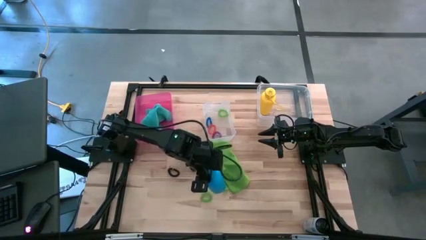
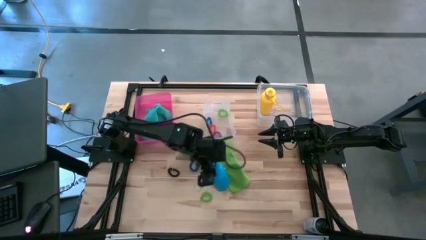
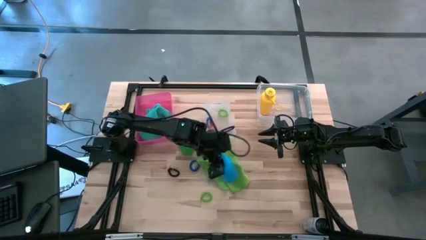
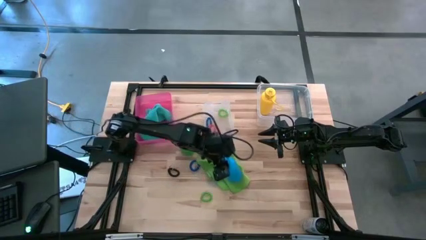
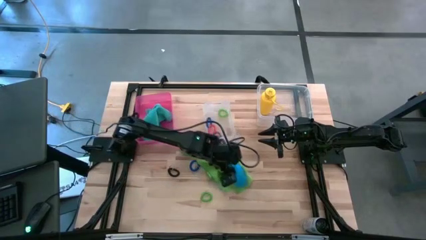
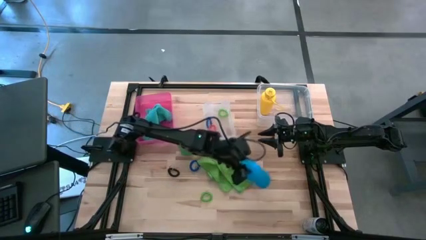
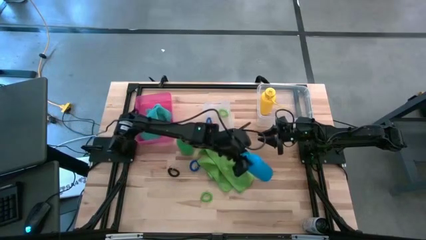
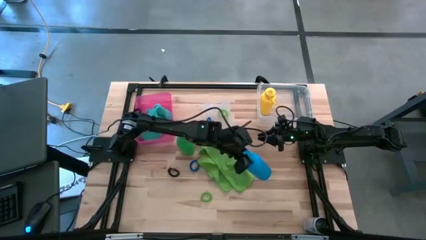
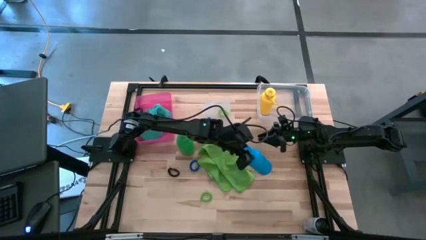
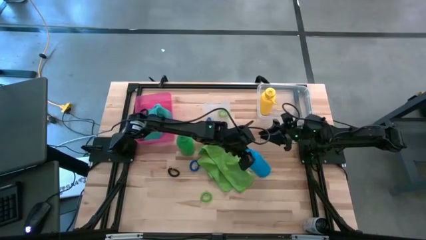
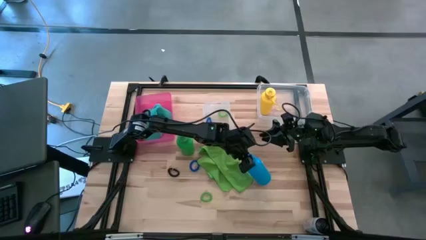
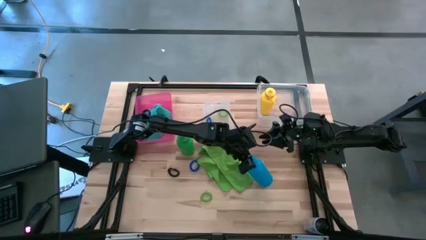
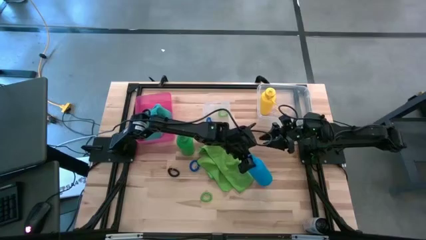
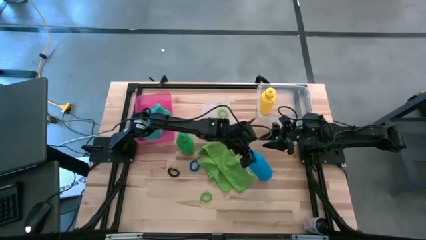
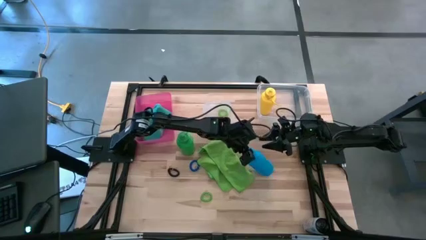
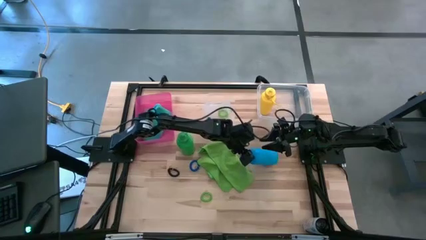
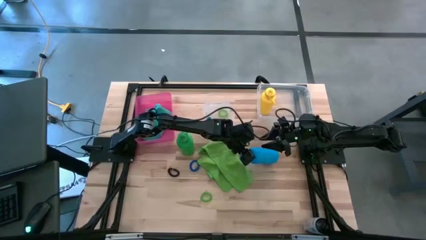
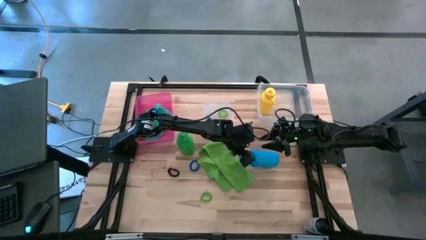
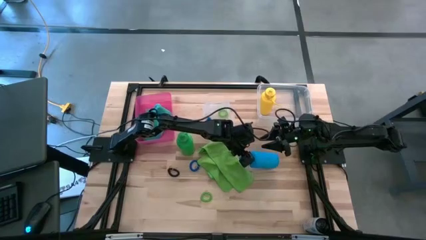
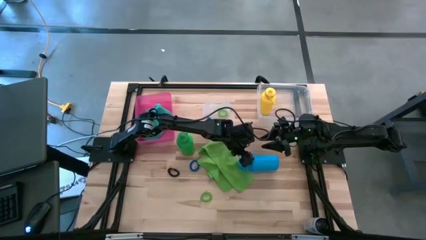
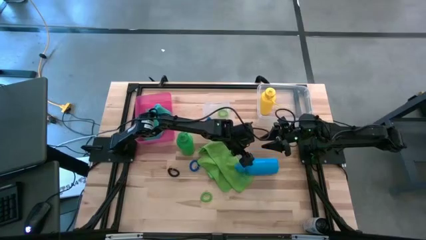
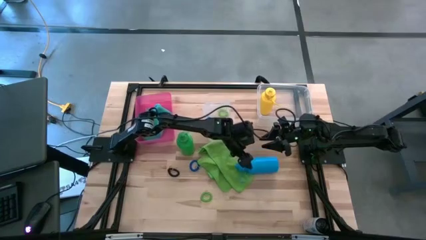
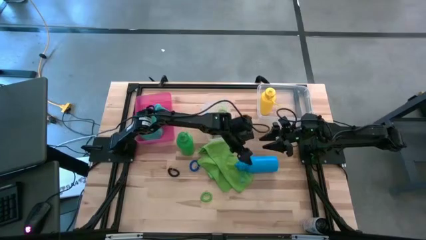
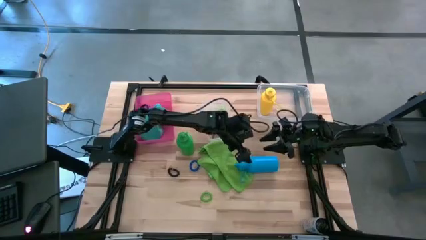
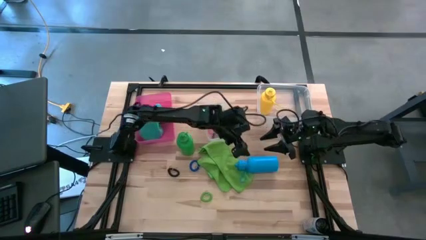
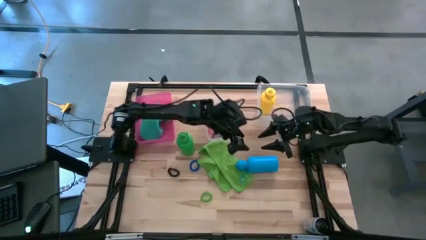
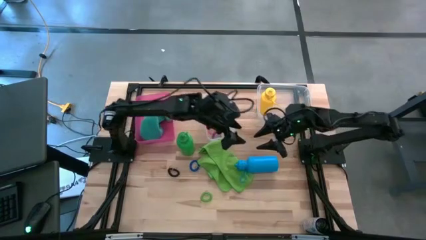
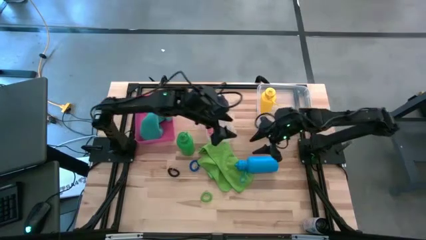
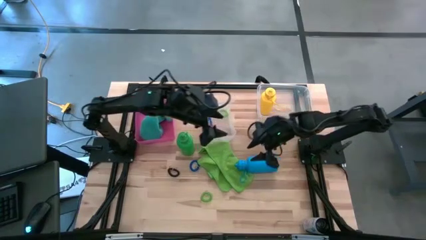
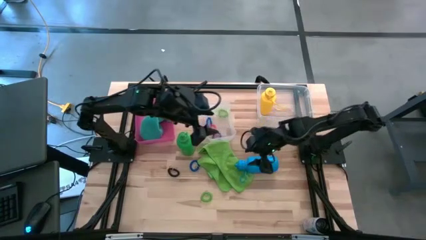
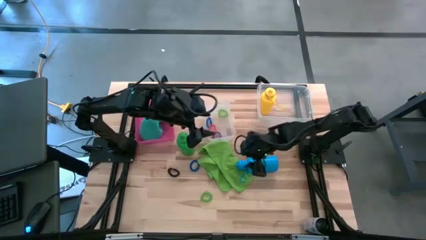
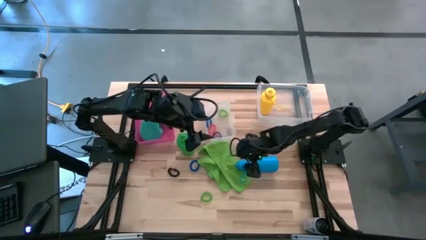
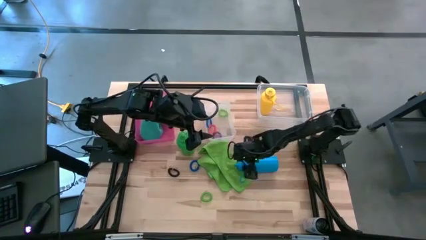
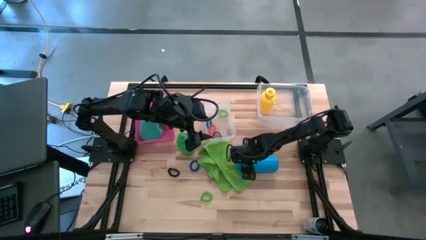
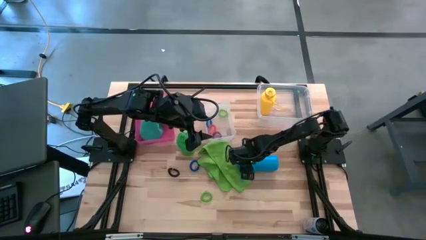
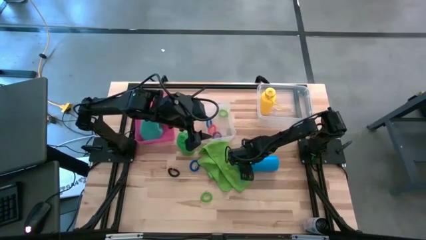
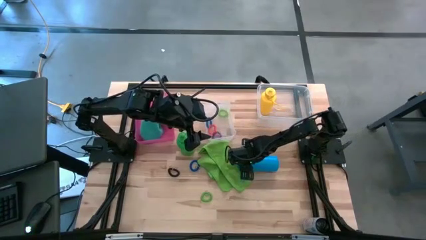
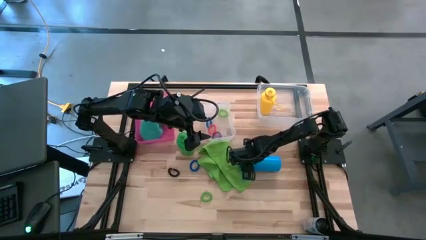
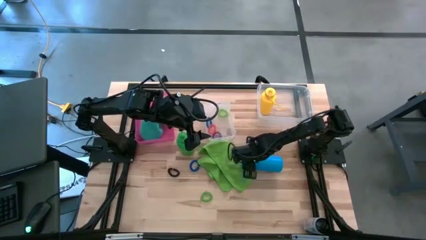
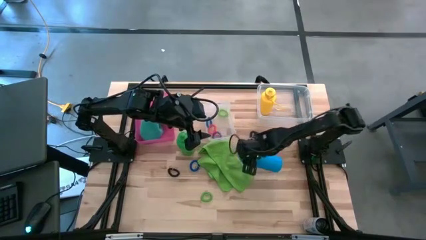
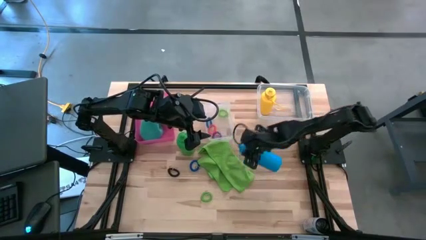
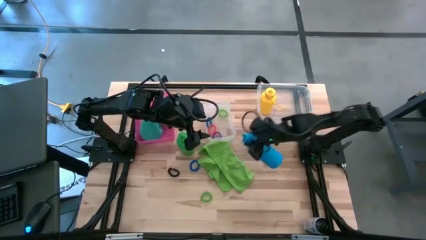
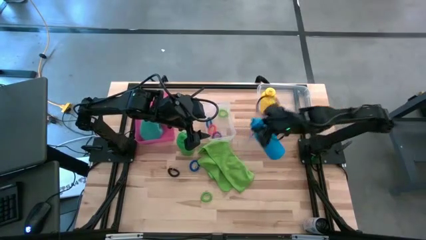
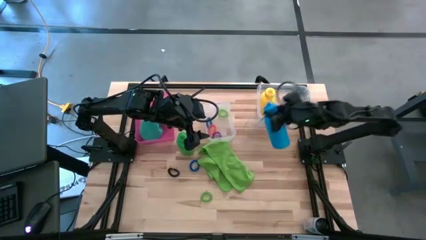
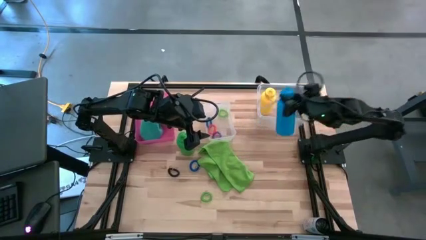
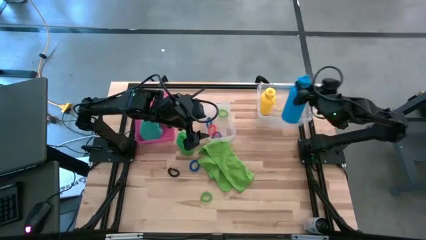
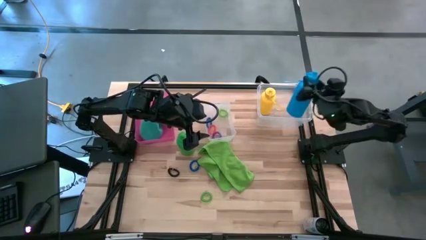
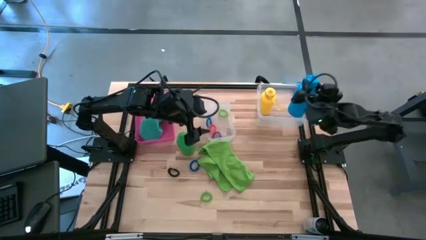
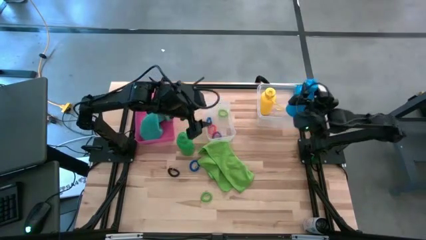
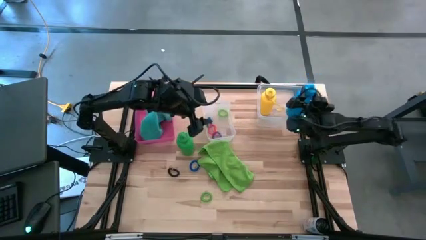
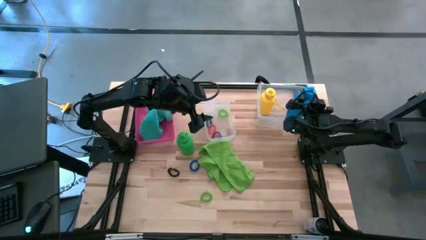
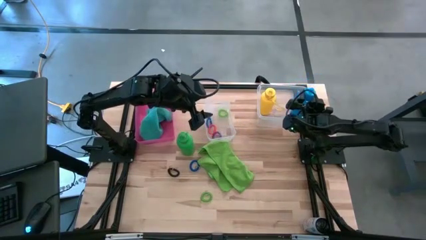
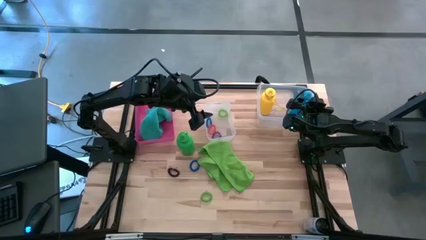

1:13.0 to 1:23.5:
Task: Pick & Place Sports Items
Put the blue water bottle into the right transparent bin

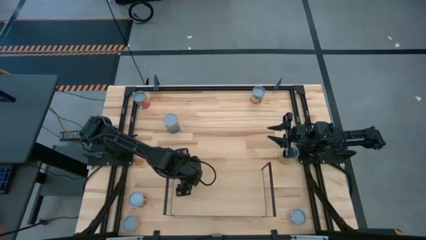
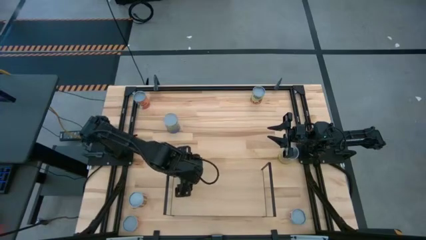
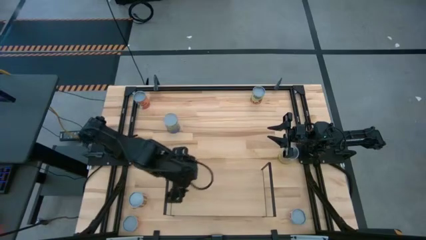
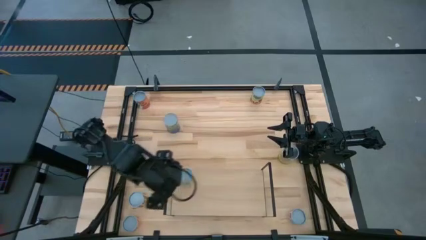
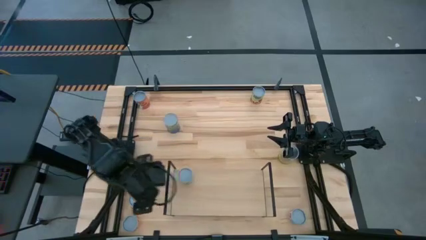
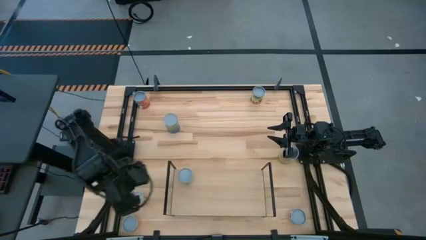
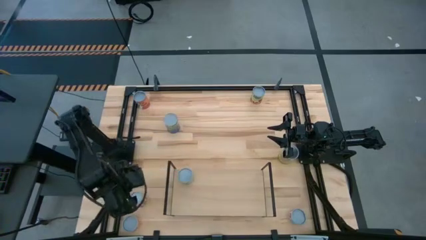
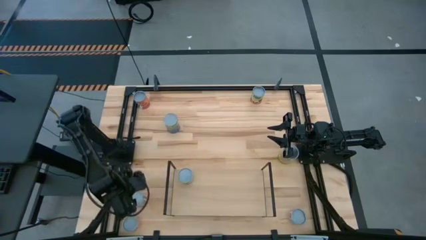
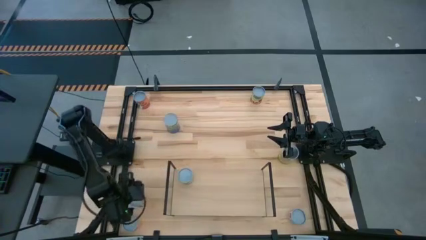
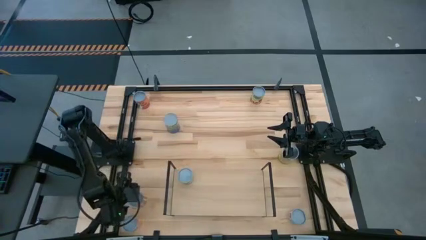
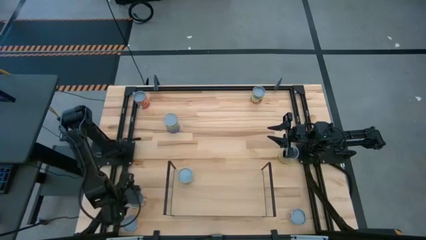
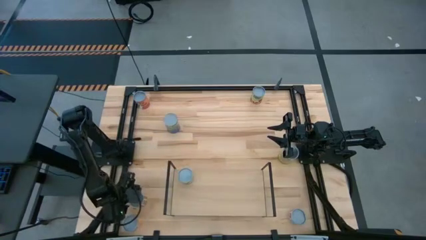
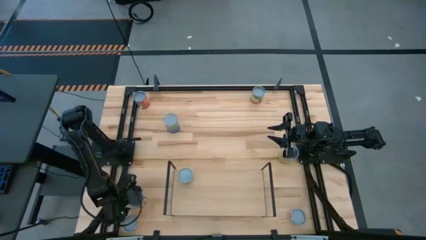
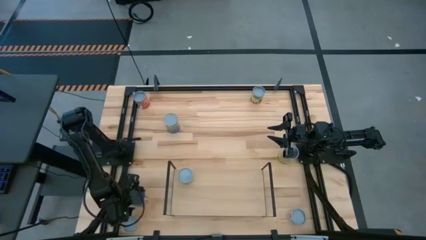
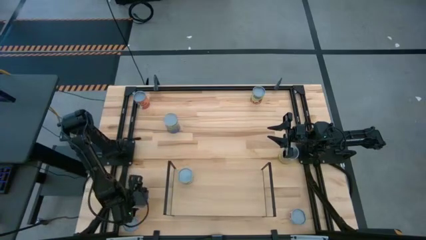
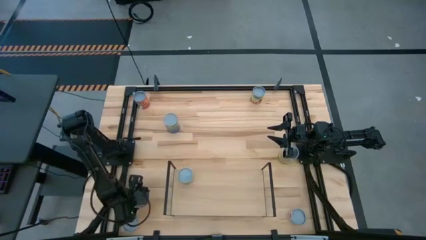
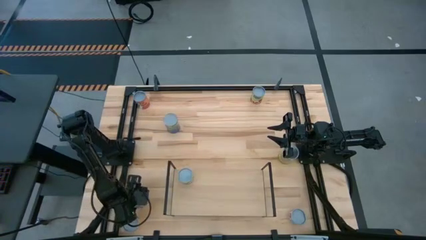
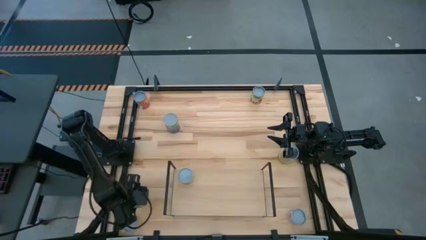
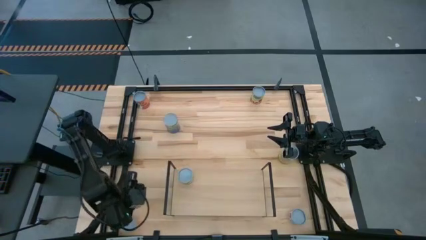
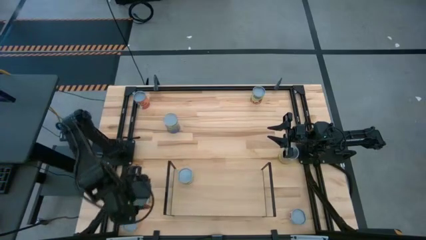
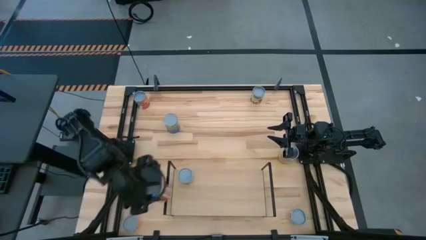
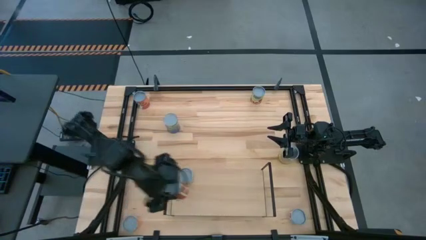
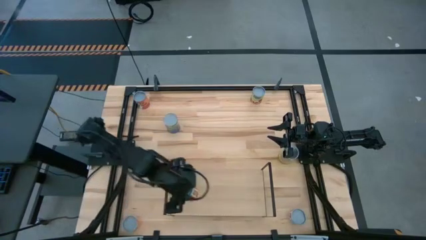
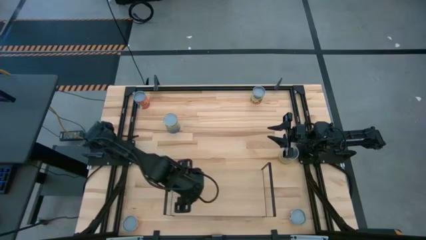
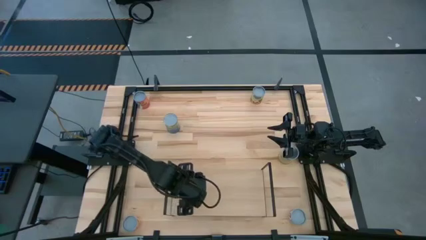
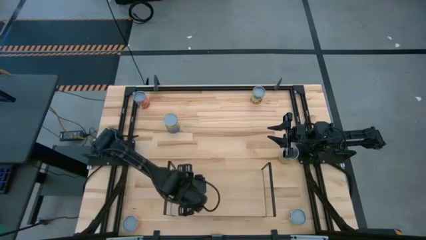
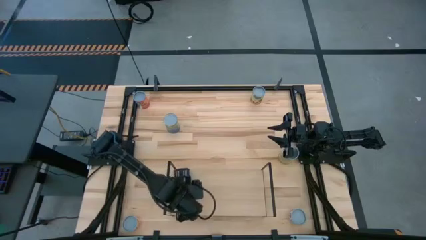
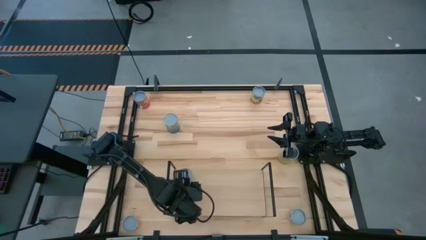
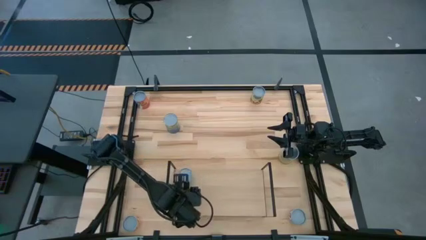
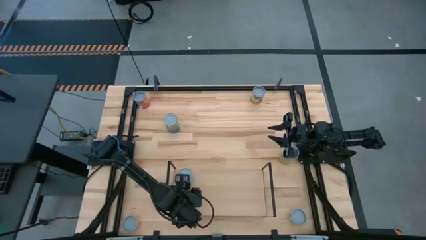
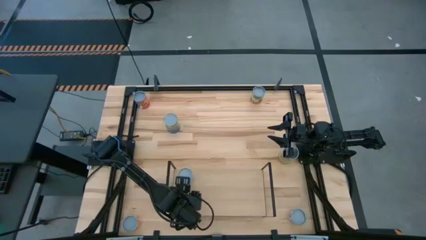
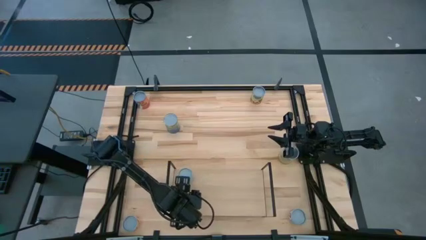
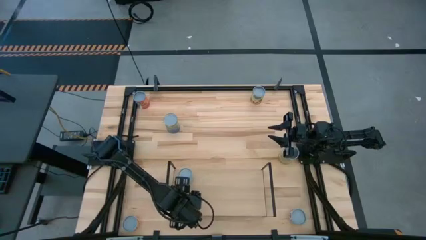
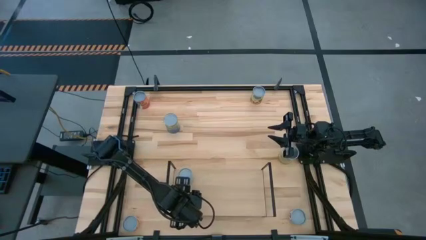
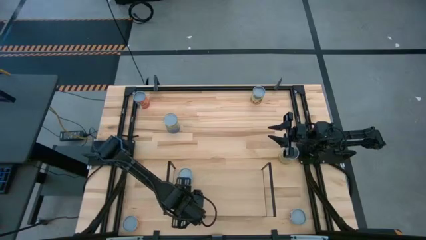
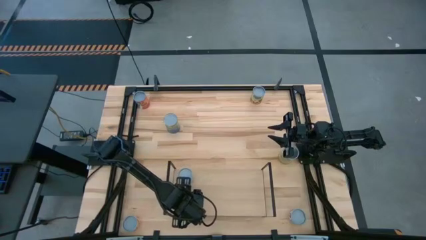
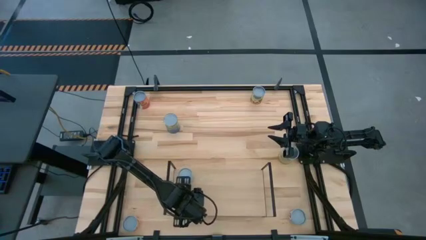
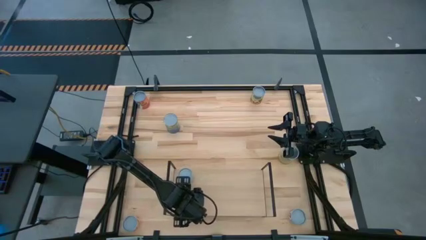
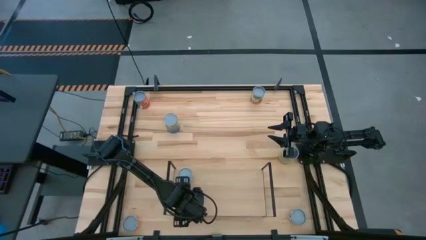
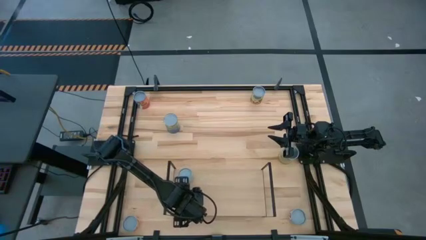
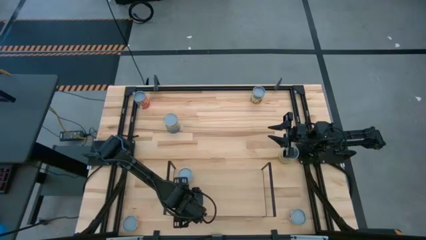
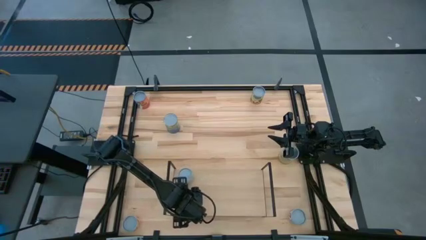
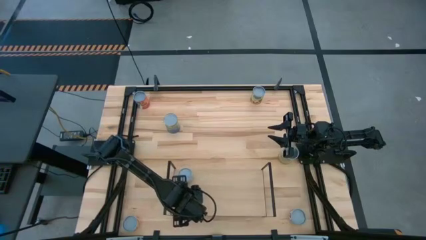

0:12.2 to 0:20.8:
Task: Pick and place cans onto a shelf
Put the canned tomatoes on the shelf
